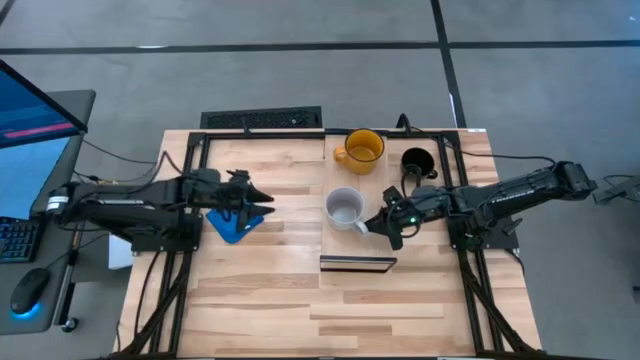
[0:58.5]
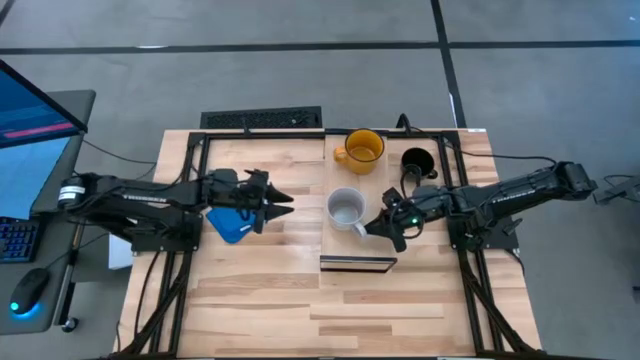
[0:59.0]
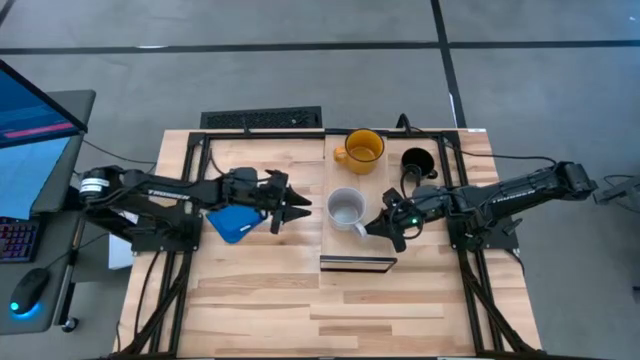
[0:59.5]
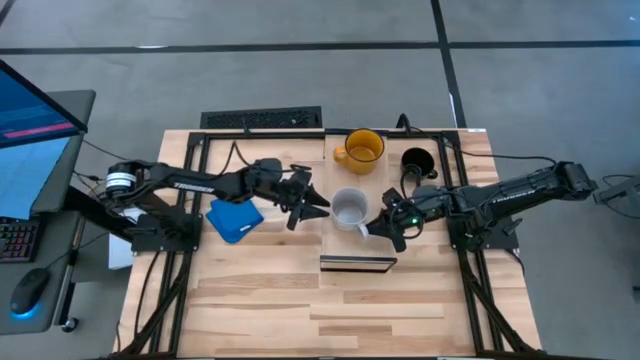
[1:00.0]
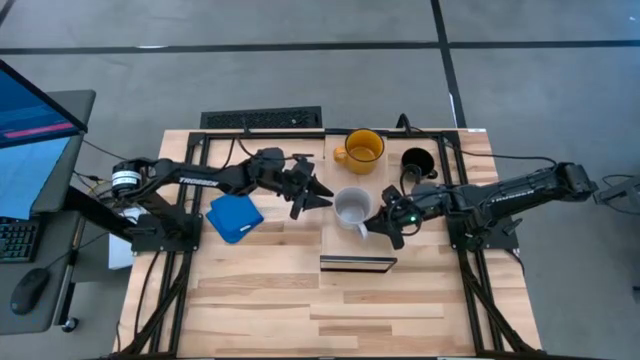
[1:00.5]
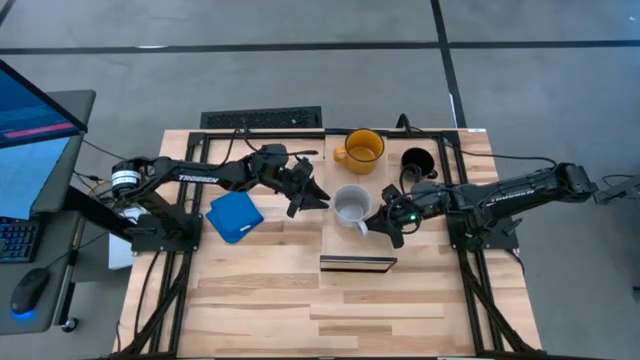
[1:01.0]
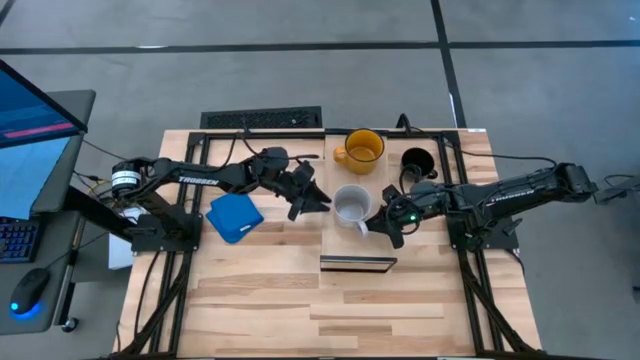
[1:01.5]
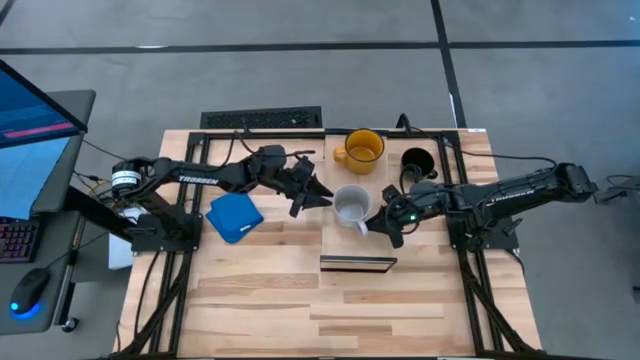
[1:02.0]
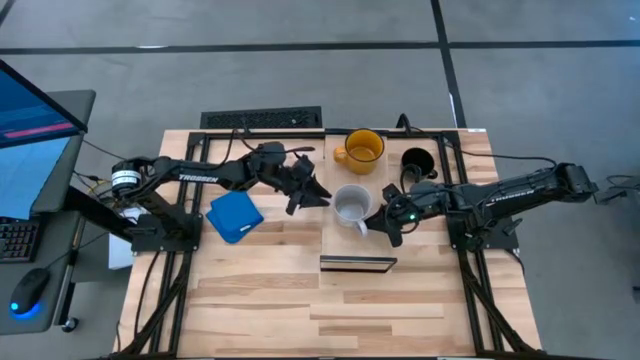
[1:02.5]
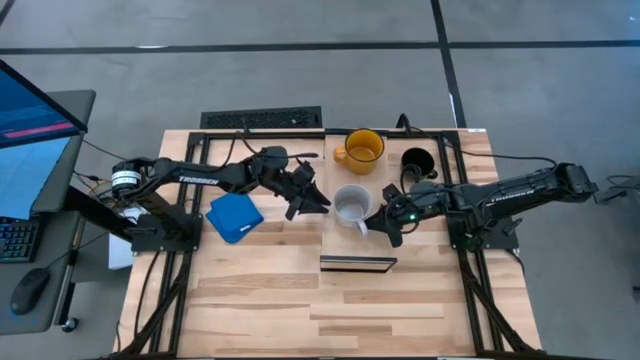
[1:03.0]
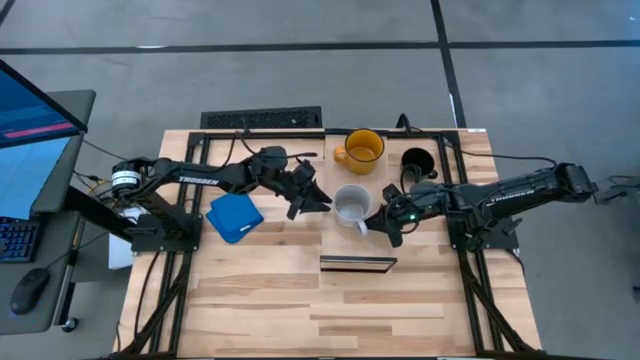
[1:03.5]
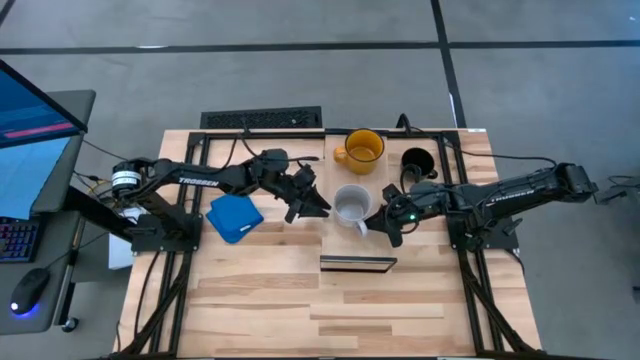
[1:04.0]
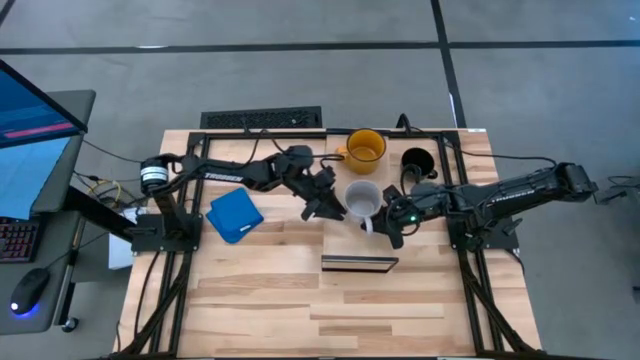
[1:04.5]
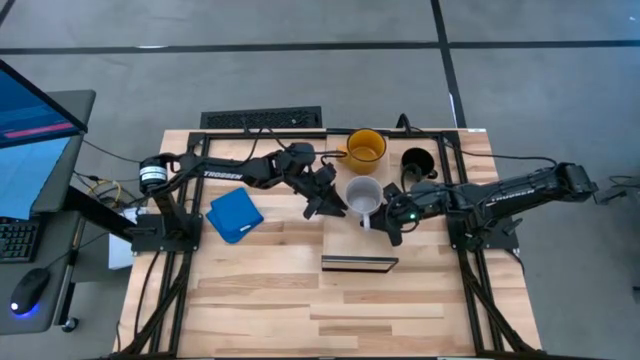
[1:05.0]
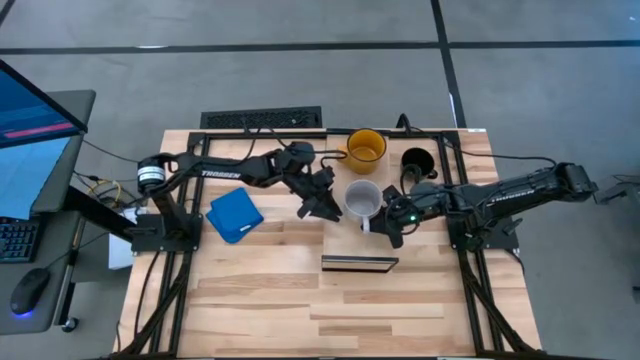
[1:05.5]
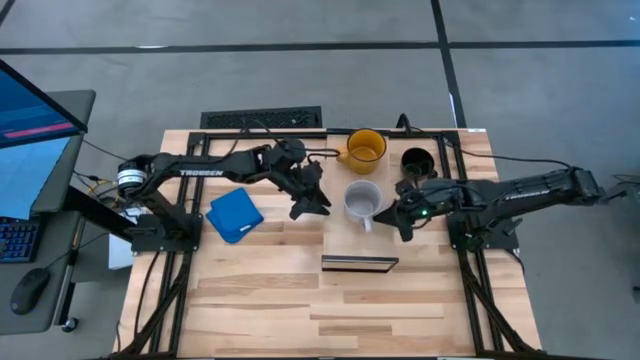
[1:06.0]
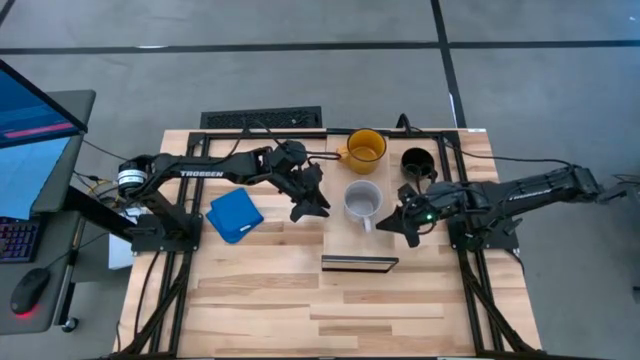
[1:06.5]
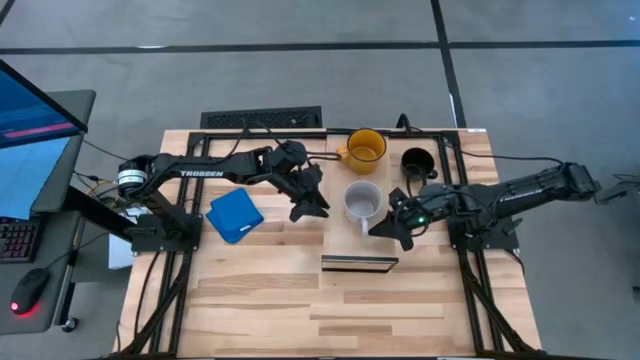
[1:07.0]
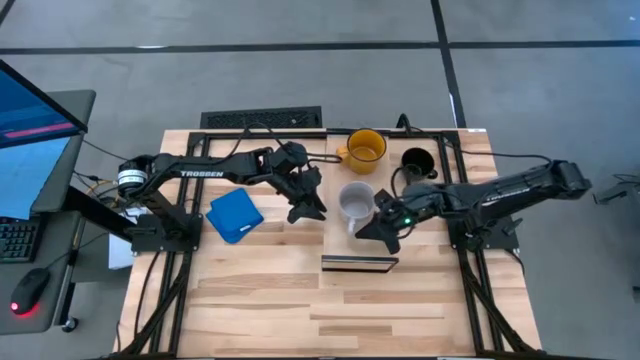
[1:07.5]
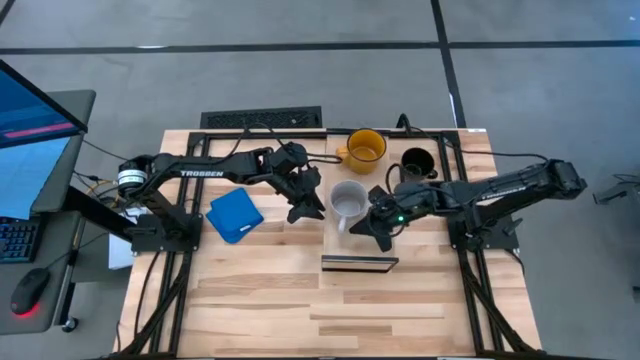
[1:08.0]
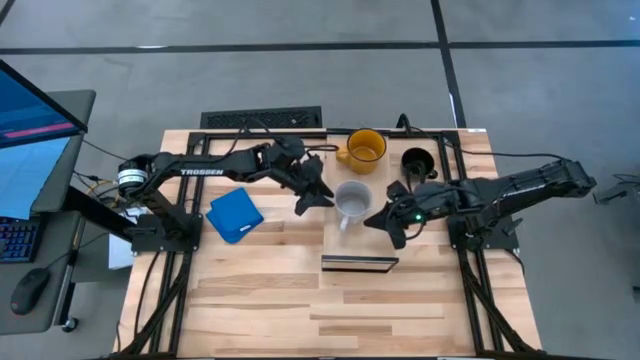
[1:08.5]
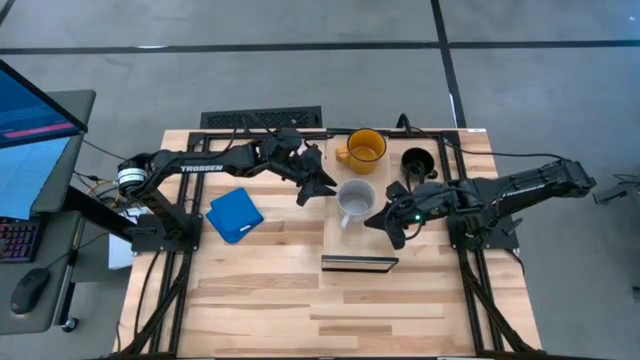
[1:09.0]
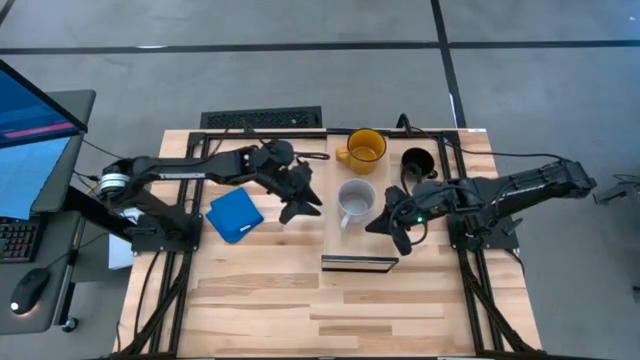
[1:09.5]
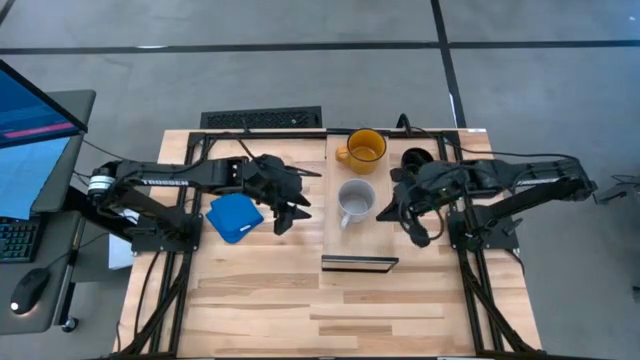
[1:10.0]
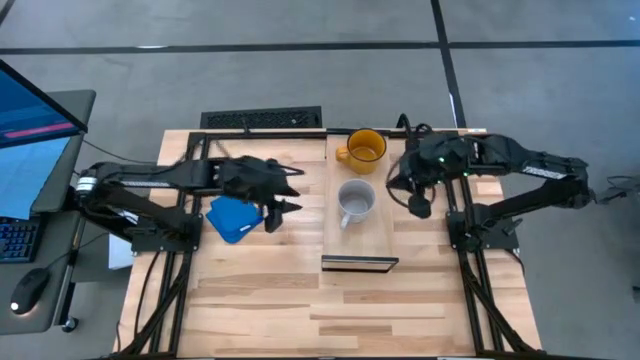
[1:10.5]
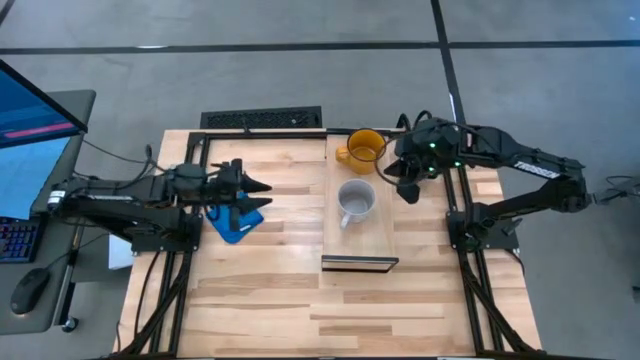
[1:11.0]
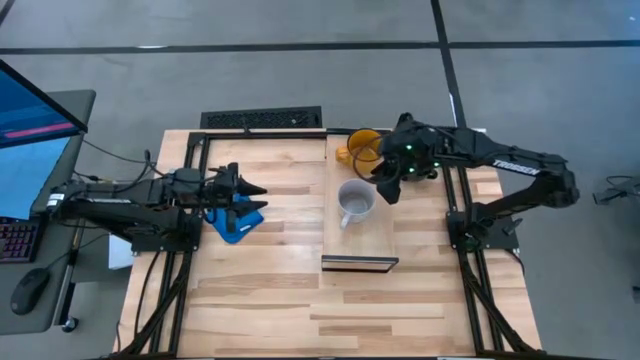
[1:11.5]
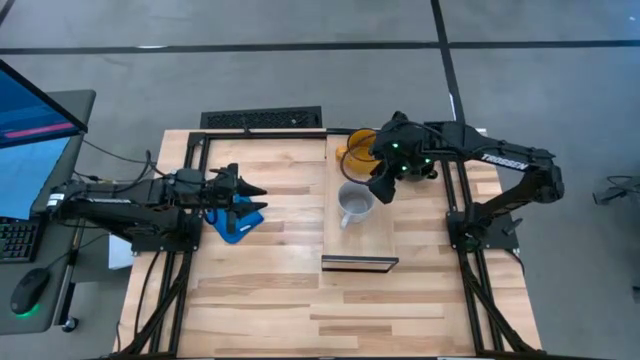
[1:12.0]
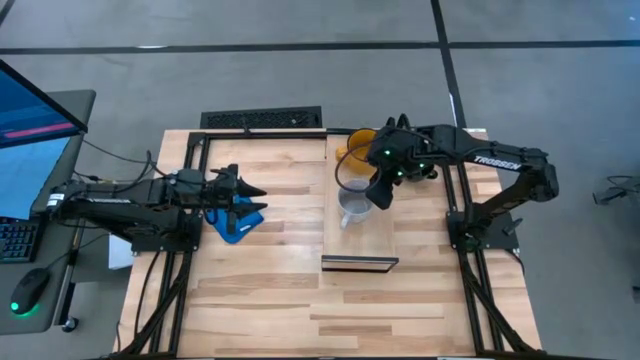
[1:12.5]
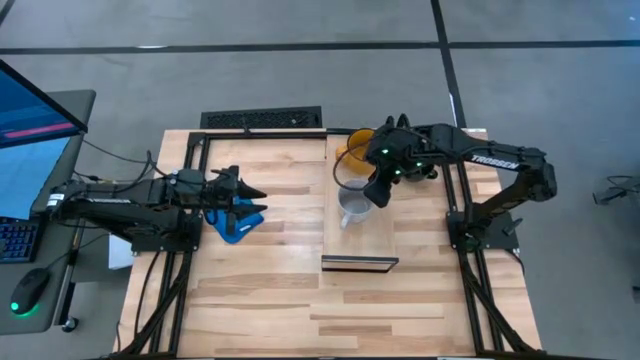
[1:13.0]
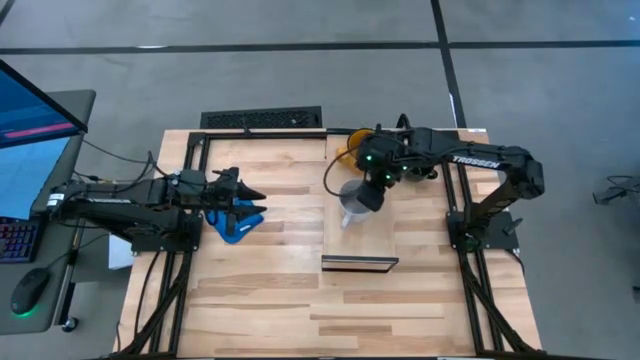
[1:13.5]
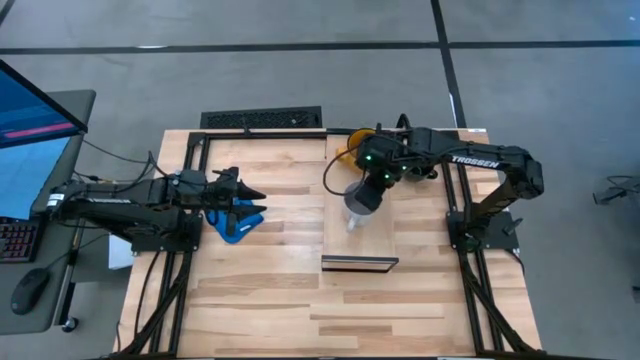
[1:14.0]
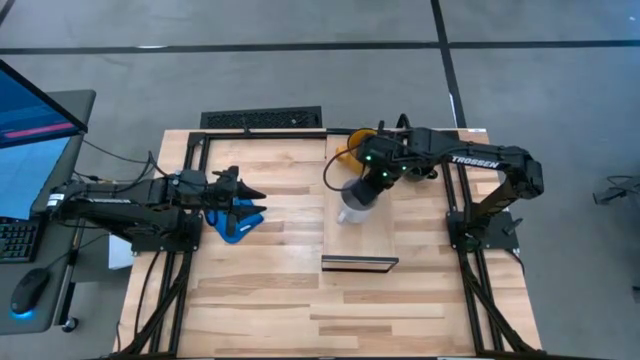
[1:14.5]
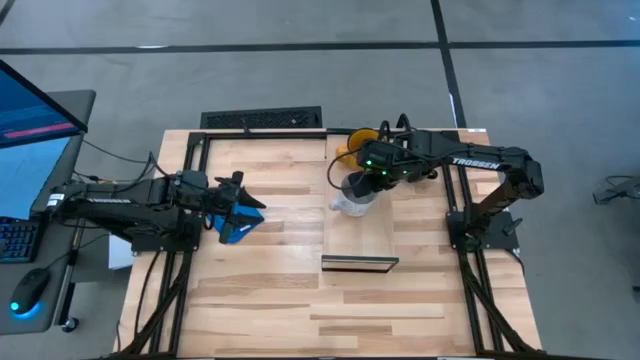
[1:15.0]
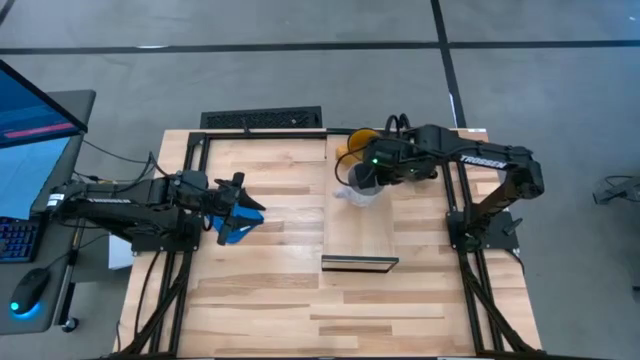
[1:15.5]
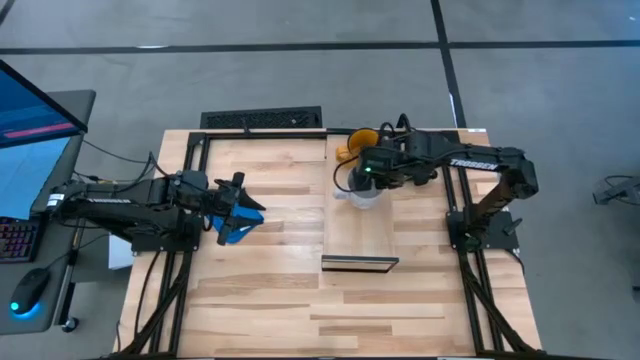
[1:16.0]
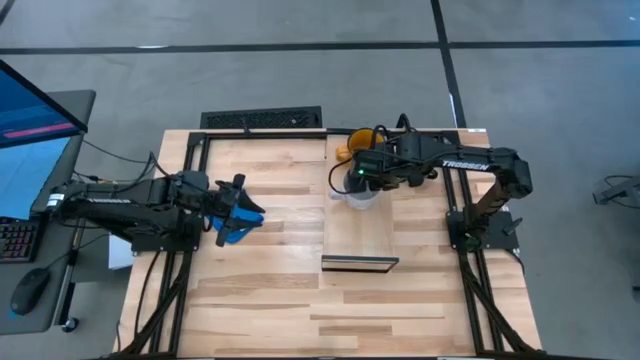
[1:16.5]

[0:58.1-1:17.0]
Task: Stack small to large cups/mugs on shelf
Put the gray mug on the shelf

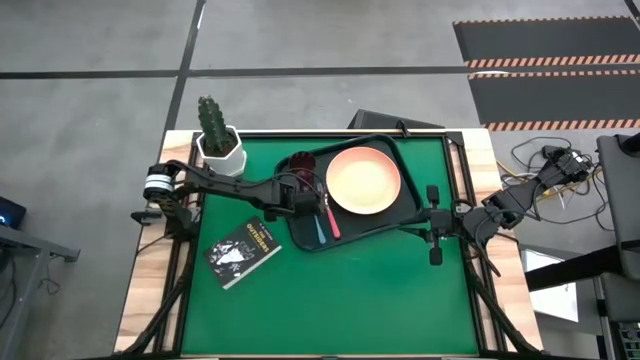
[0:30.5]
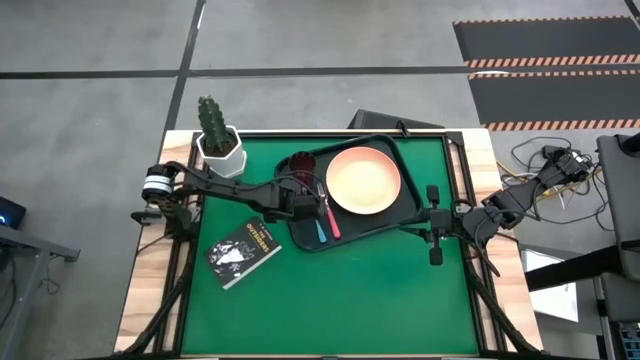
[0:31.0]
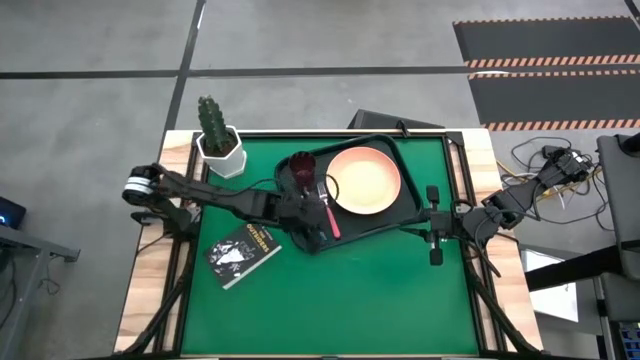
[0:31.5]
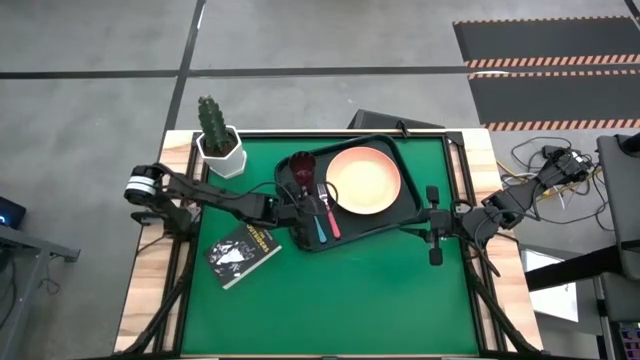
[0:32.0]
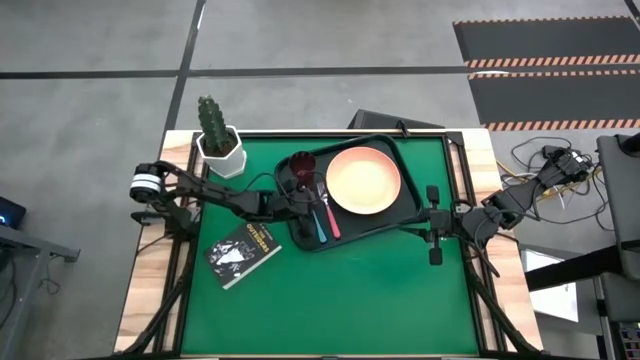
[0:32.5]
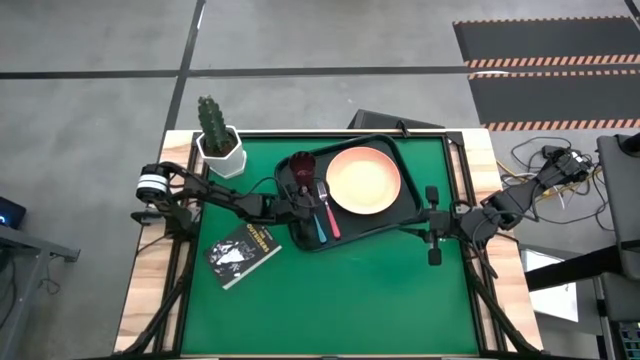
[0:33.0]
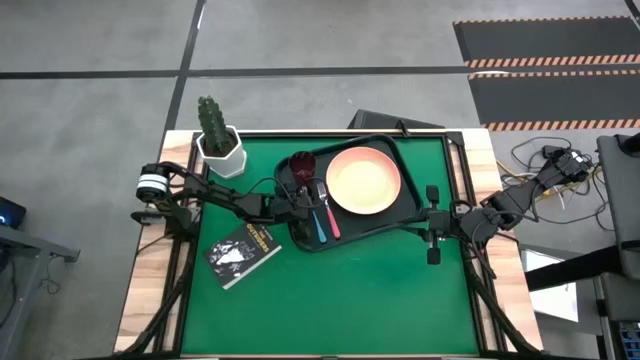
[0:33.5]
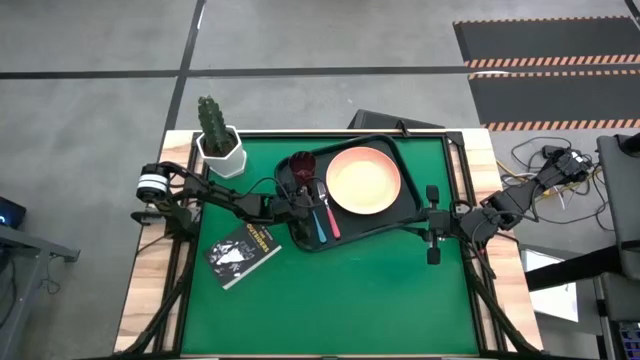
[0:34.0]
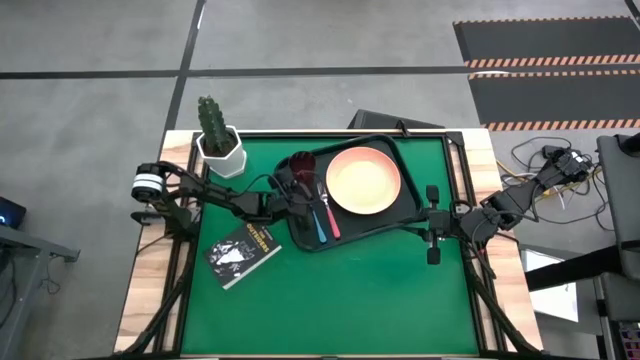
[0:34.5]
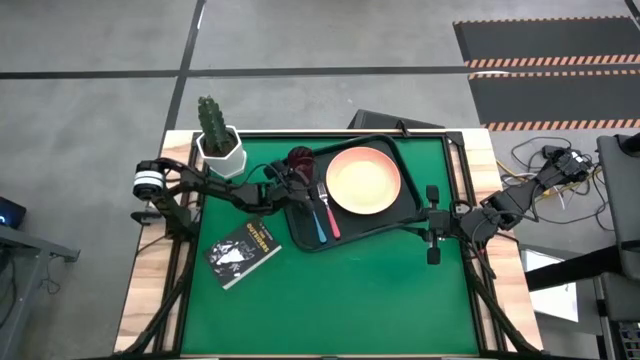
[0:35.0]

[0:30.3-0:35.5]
Task: Pick and place plate/cup/fork/spoon on tray
Adjust the red cup on the black serving tray
